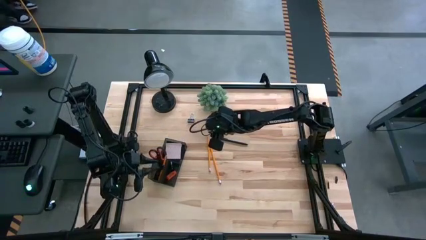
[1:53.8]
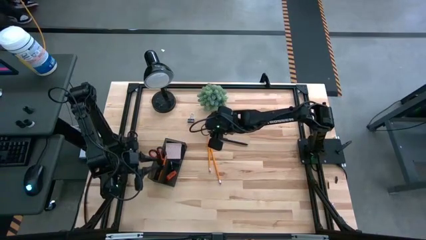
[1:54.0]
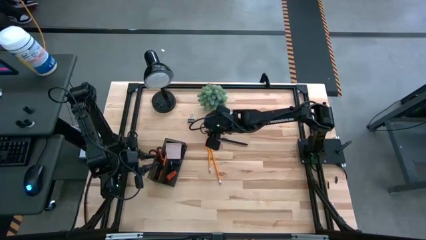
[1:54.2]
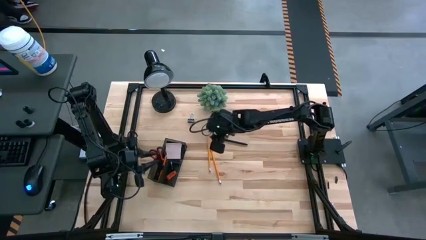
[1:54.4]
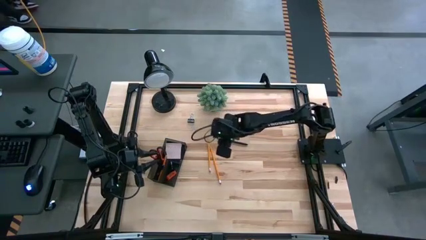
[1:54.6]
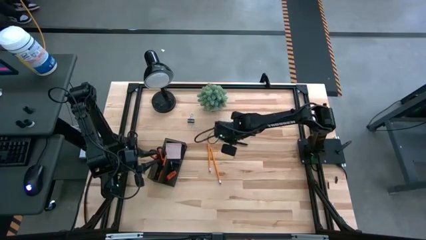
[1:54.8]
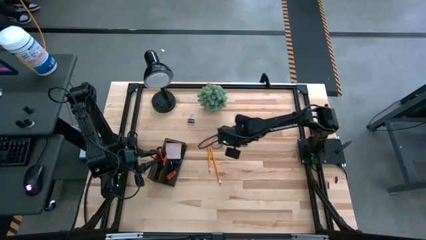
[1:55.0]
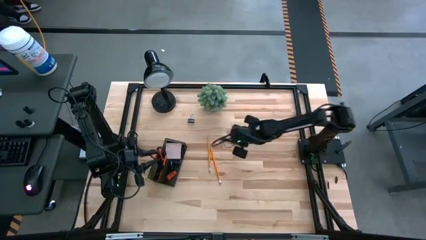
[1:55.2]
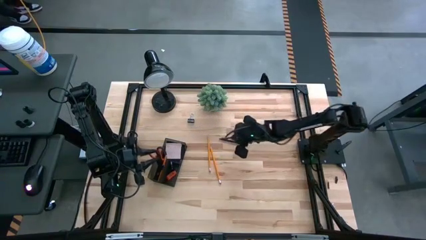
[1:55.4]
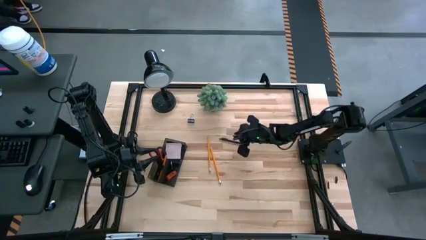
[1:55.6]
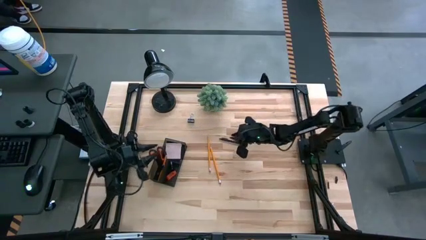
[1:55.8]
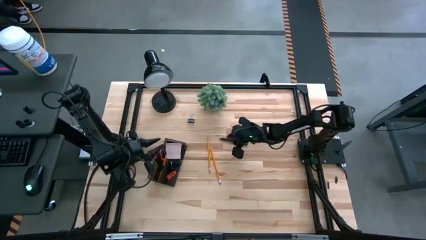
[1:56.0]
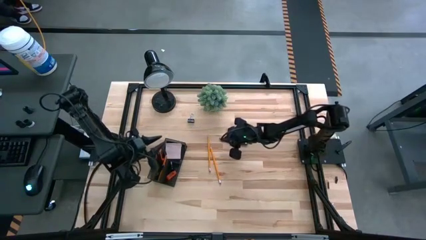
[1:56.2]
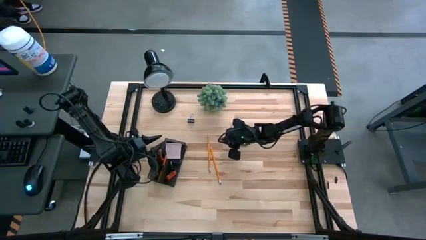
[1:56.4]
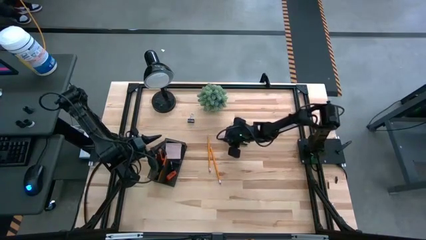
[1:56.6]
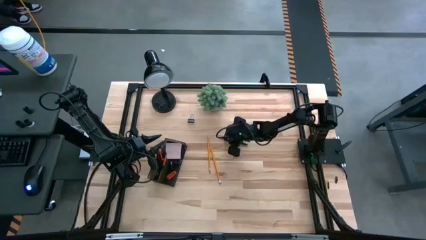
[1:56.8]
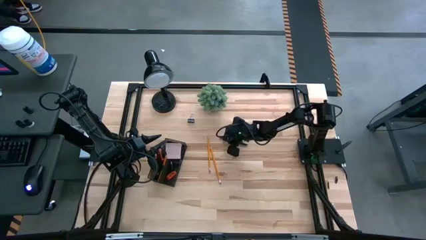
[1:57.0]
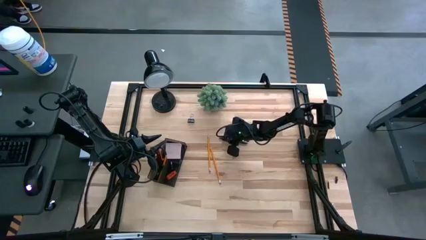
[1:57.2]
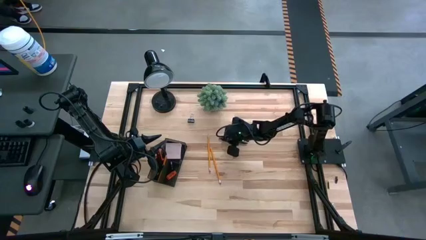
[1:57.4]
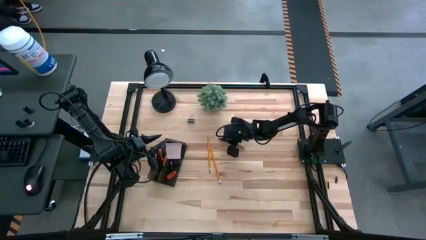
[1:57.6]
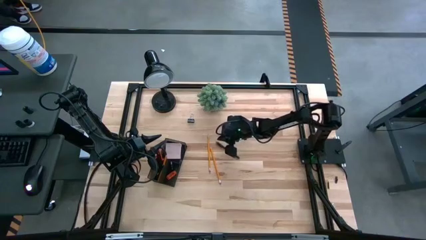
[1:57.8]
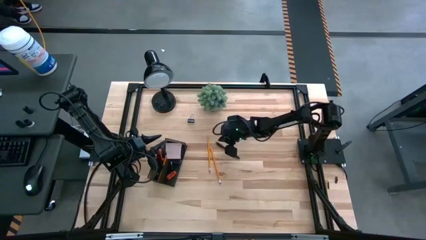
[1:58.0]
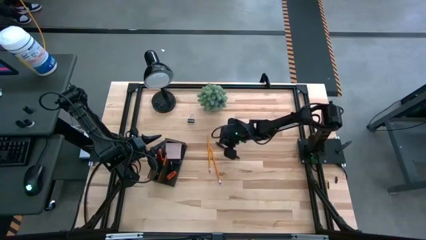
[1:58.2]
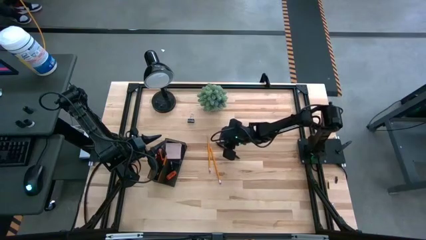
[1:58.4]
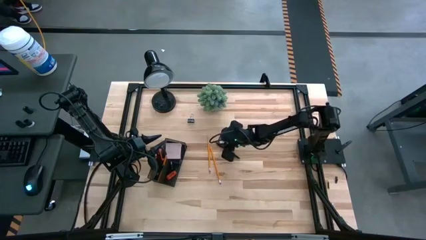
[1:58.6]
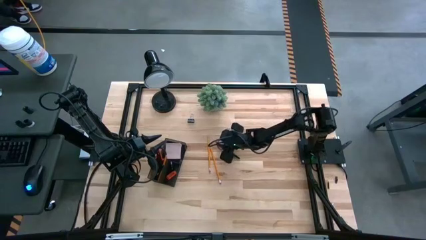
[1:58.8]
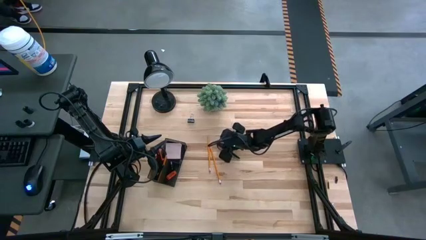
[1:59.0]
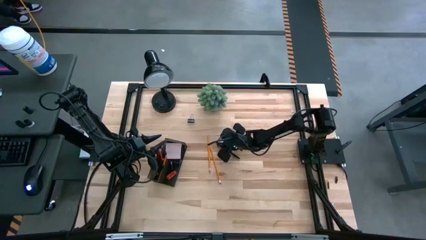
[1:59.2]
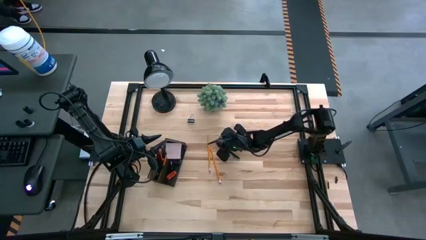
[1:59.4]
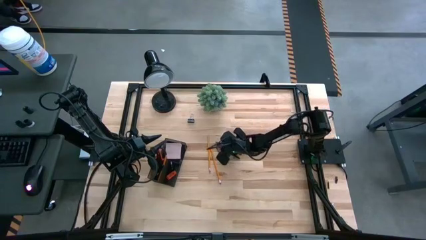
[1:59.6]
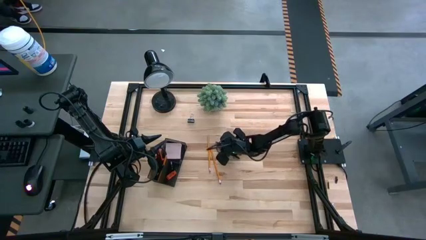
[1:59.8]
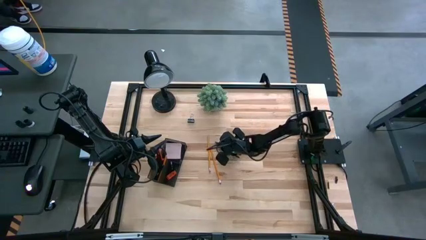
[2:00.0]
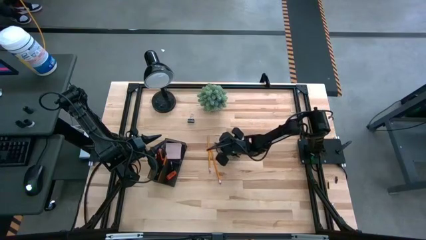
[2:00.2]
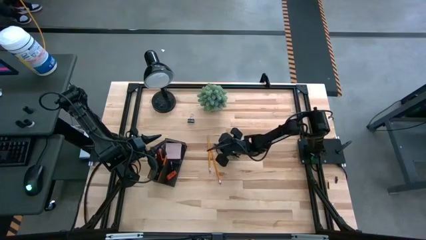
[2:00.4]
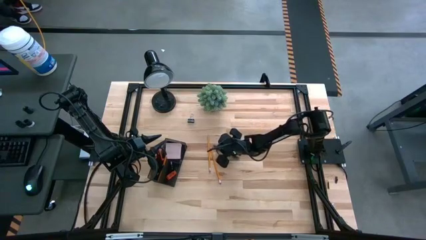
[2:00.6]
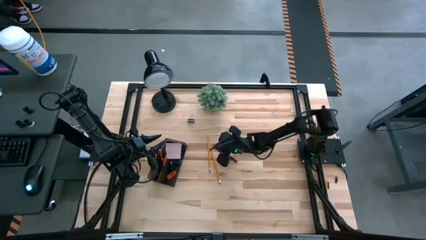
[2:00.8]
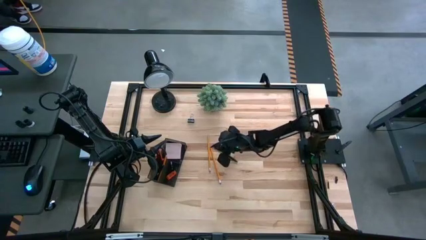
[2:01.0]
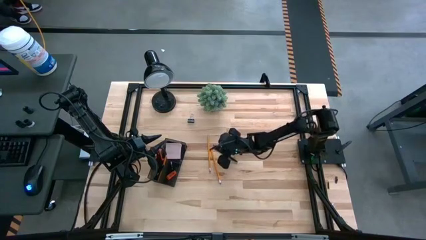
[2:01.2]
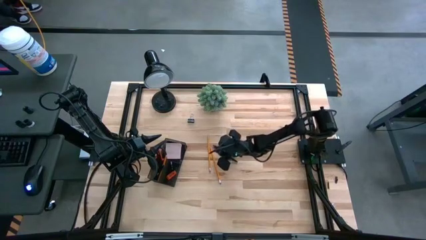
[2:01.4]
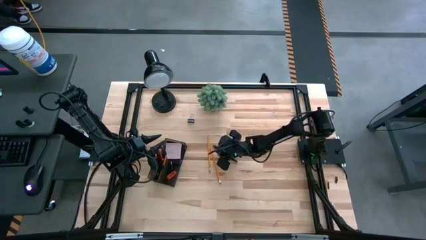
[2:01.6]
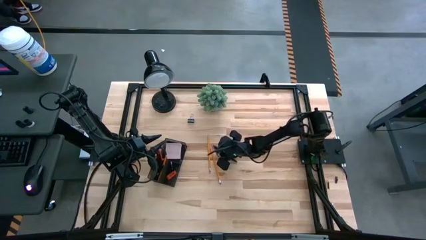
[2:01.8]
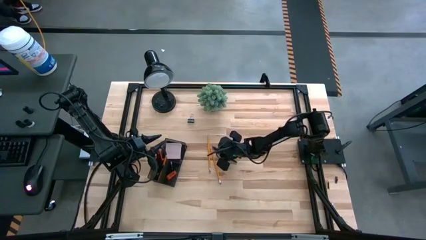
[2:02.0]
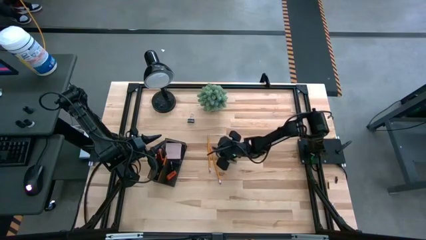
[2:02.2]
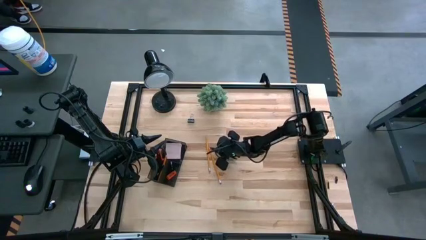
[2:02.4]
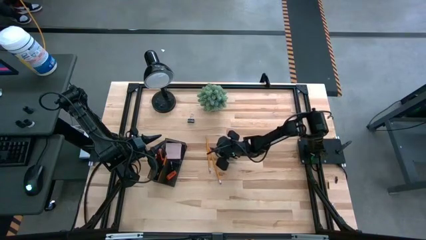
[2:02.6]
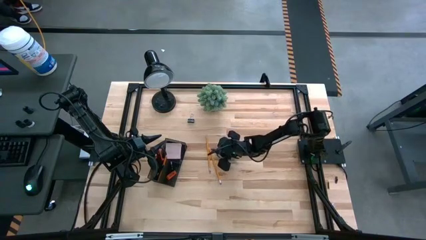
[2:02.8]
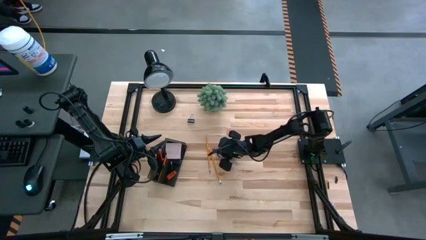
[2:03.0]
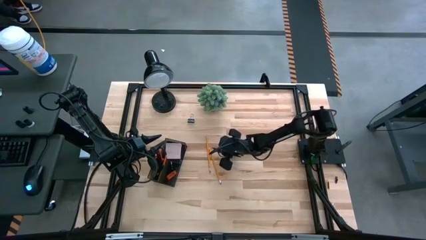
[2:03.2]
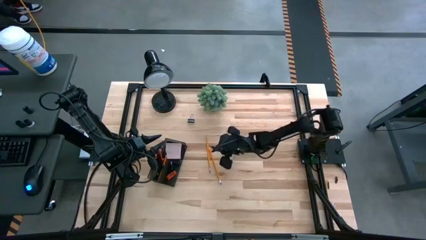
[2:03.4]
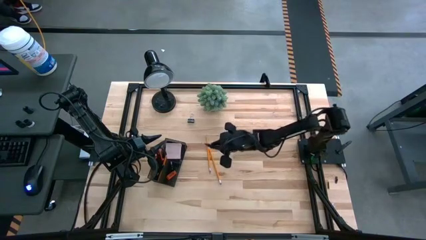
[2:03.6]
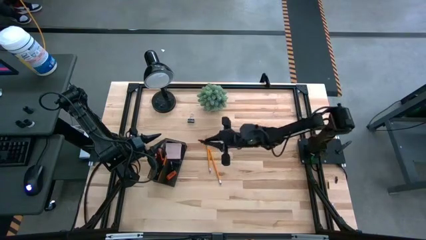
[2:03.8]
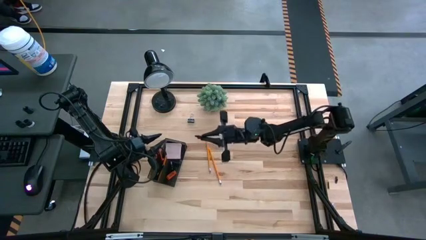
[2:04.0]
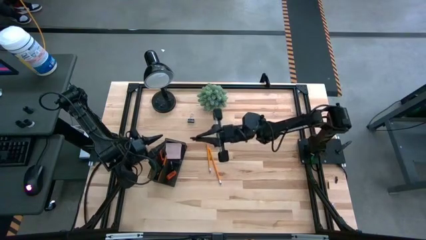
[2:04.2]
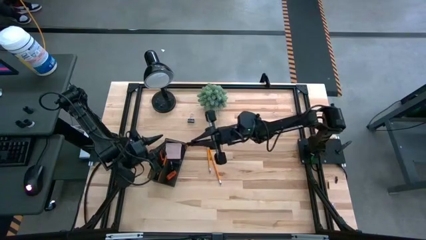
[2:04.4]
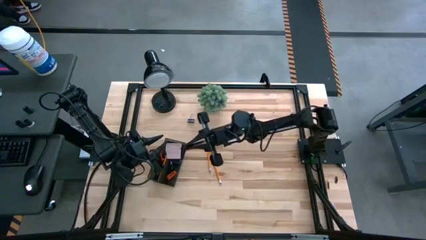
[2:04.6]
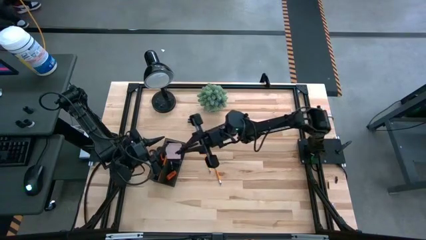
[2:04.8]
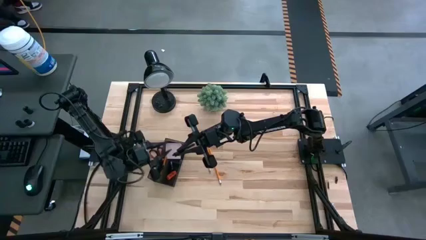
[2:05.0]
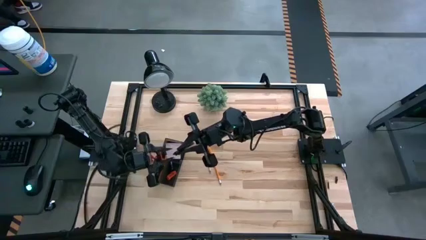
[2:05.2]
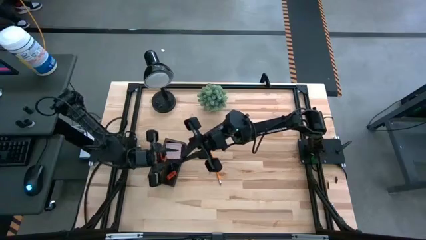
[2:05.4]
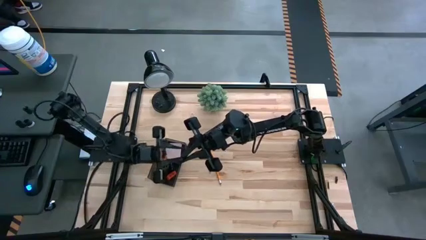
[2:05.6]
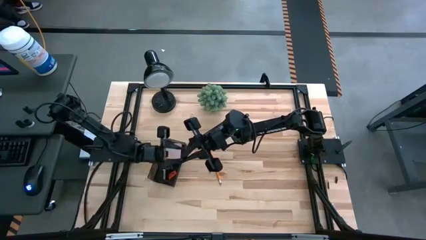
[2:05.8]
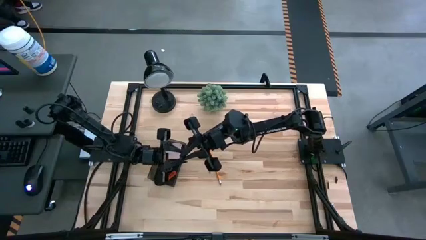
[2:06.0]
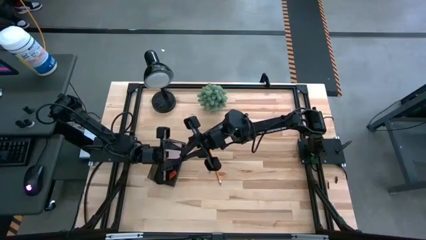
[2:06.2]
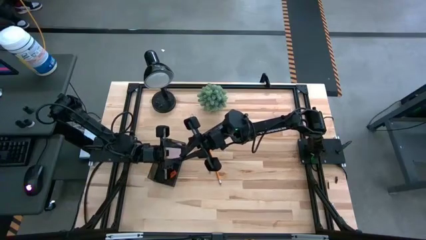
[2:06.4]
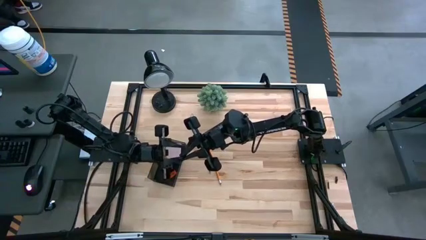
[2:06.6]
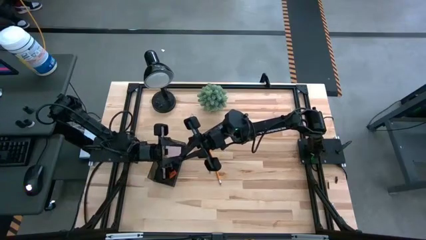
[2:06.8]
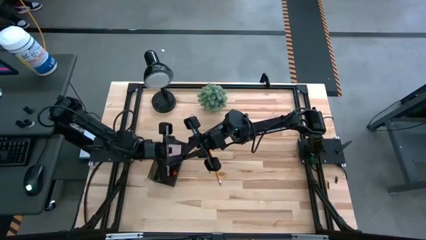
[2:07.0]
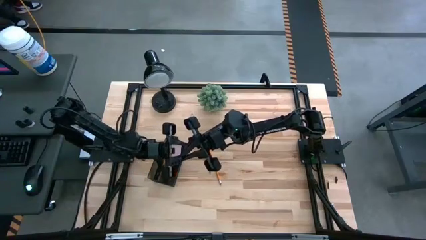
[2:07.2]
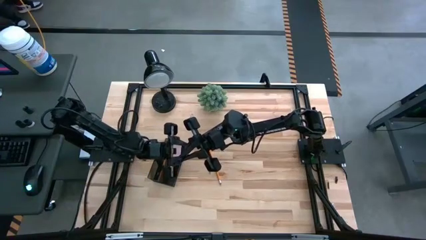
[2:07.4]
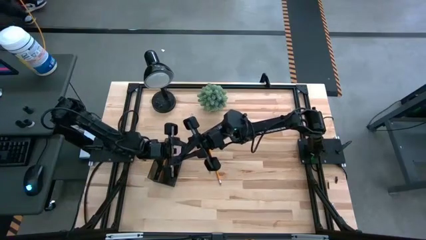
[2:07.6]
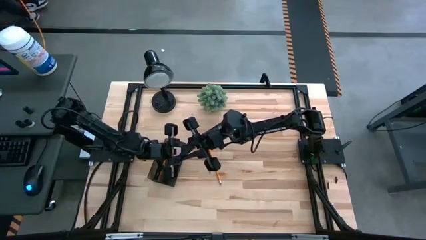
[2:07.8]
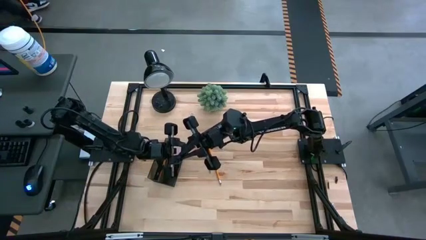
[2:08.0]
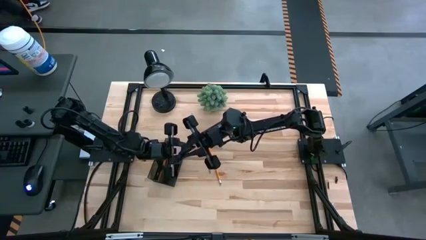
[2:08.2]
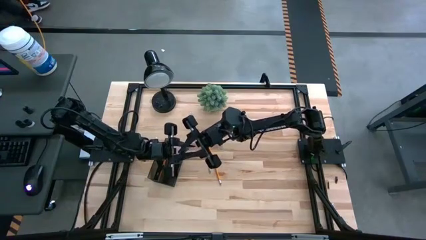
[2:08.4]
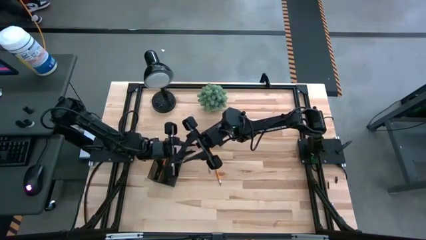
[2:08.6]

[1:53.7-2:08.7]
Task: Pick and place office supplies into organizer
Put the black pen into the desk organizer
